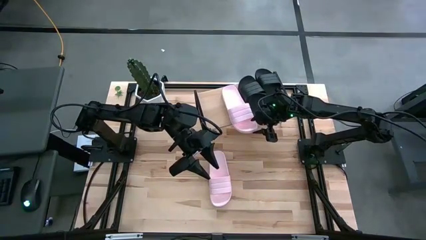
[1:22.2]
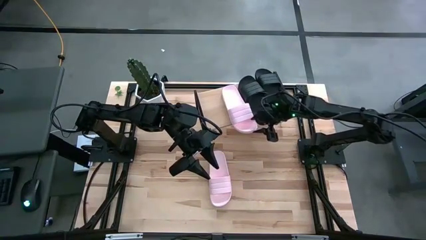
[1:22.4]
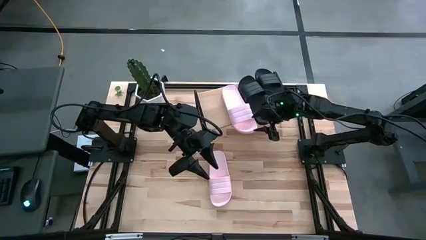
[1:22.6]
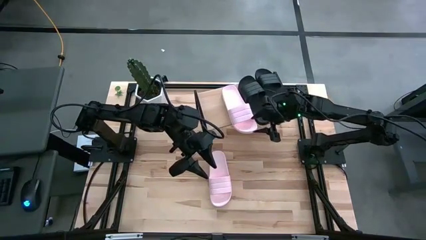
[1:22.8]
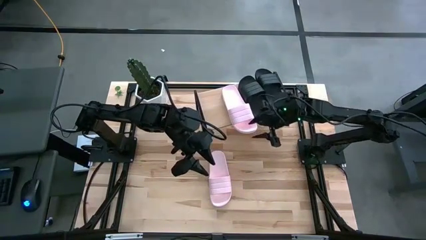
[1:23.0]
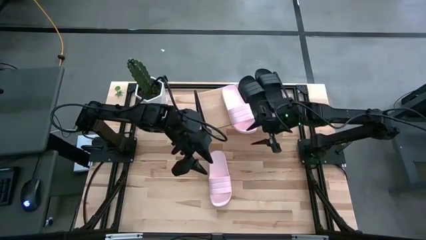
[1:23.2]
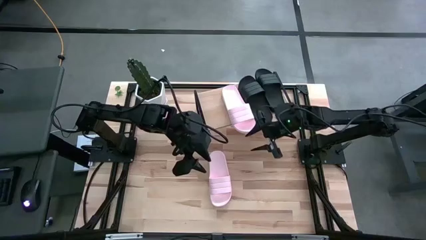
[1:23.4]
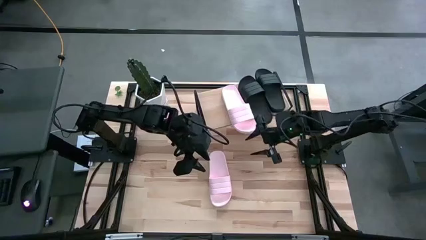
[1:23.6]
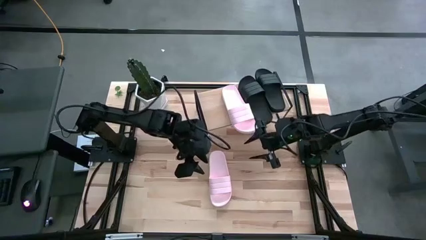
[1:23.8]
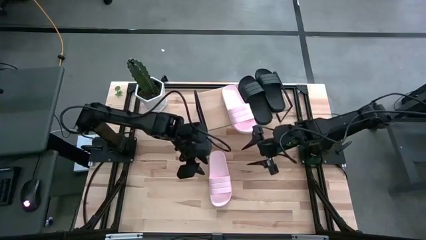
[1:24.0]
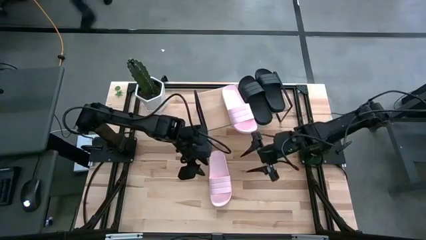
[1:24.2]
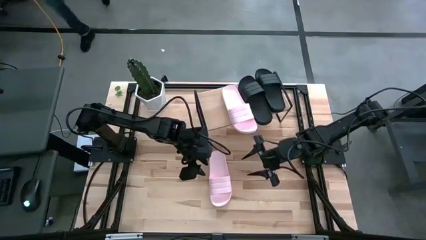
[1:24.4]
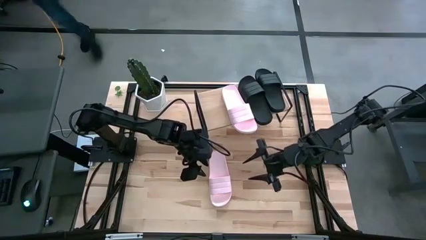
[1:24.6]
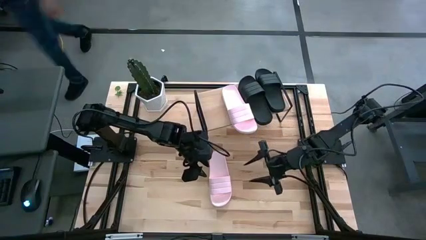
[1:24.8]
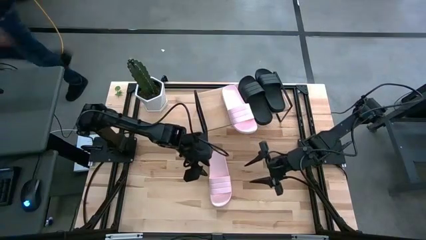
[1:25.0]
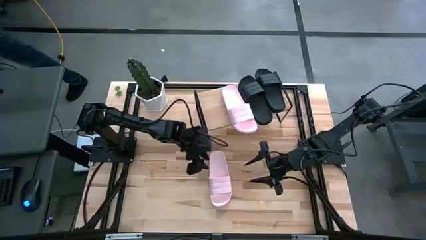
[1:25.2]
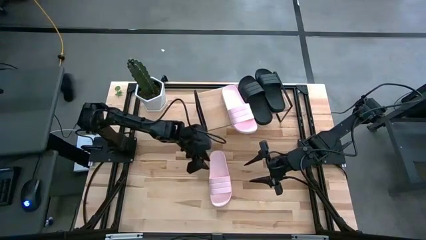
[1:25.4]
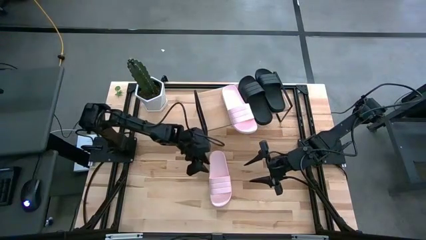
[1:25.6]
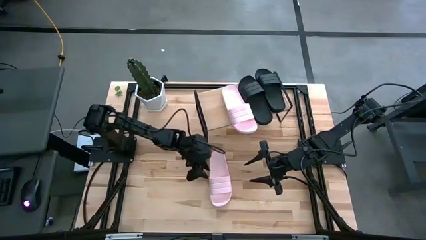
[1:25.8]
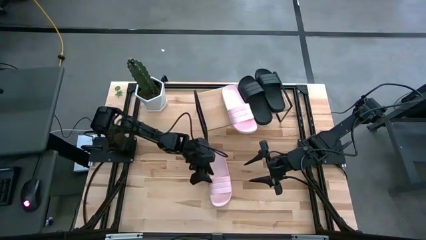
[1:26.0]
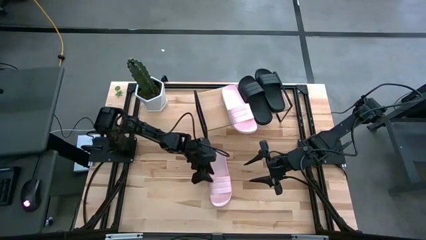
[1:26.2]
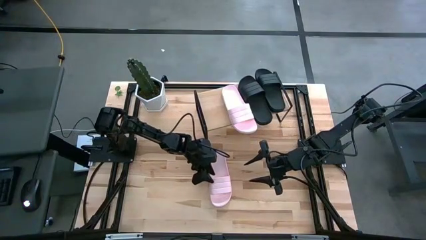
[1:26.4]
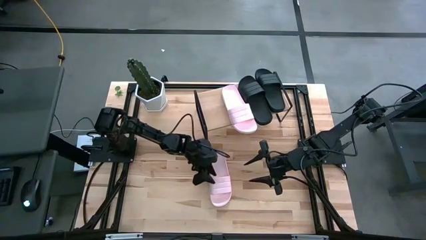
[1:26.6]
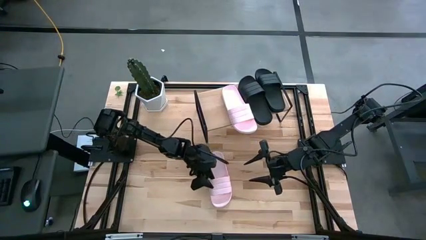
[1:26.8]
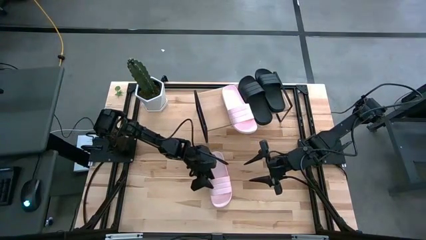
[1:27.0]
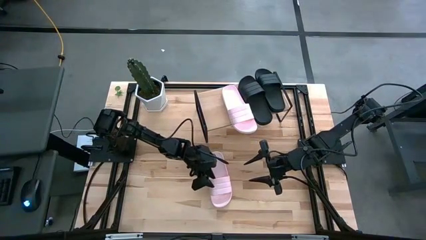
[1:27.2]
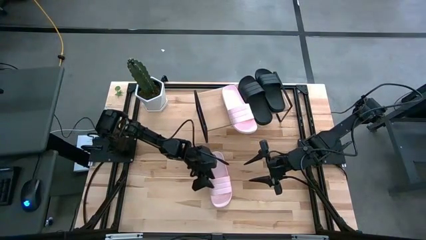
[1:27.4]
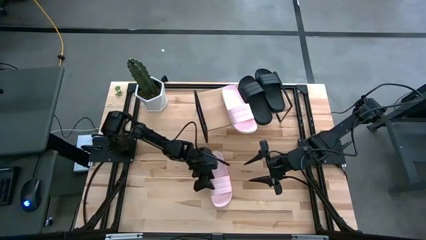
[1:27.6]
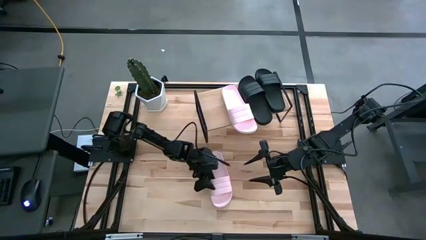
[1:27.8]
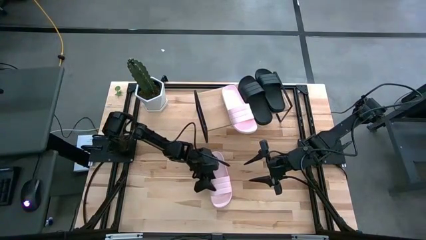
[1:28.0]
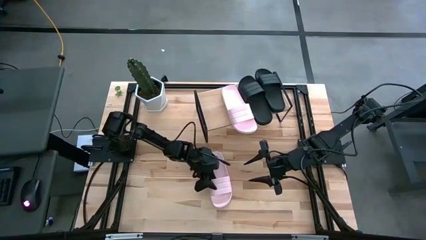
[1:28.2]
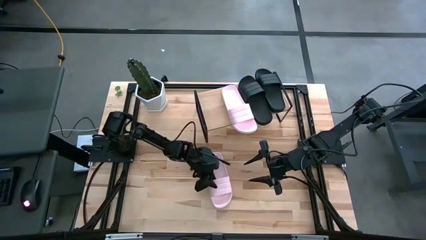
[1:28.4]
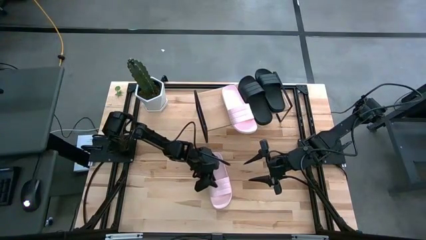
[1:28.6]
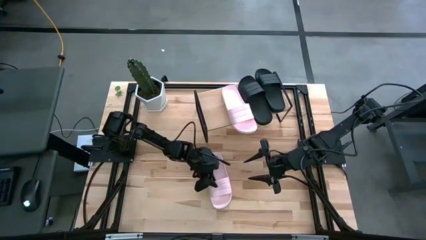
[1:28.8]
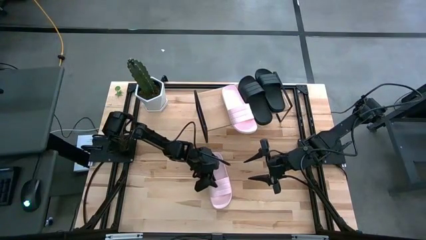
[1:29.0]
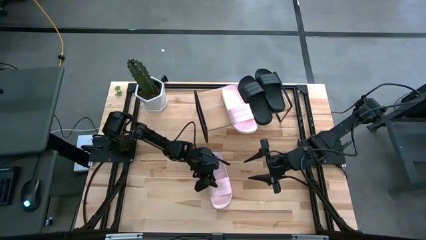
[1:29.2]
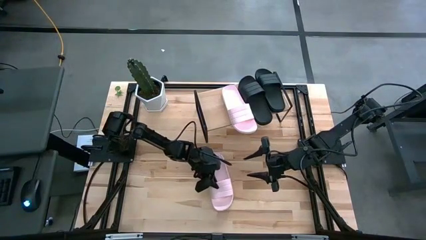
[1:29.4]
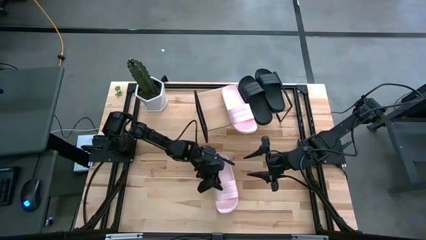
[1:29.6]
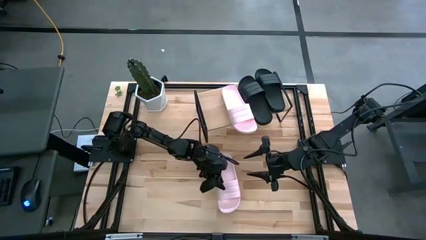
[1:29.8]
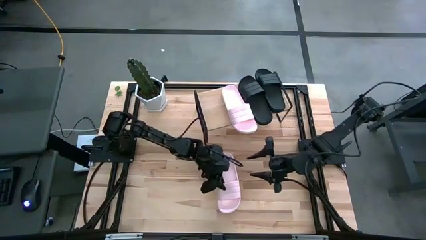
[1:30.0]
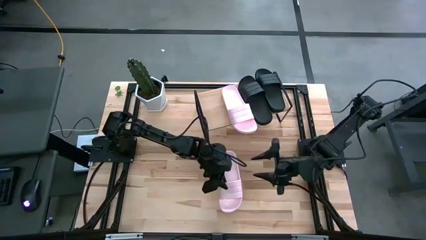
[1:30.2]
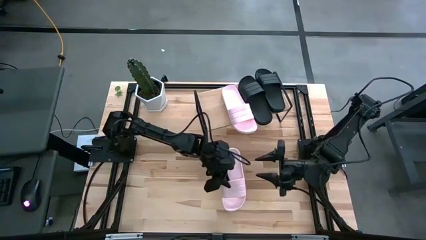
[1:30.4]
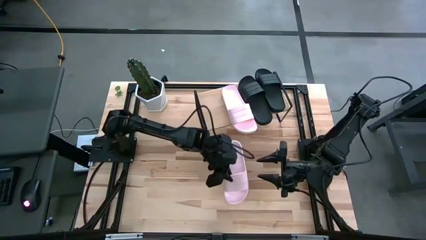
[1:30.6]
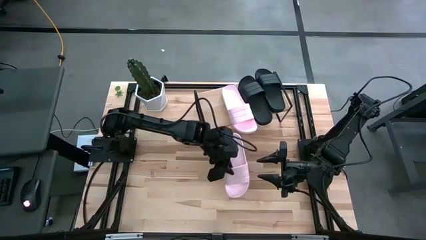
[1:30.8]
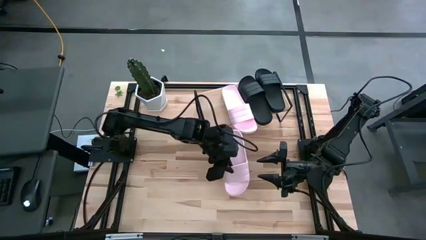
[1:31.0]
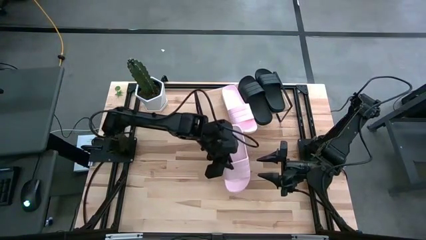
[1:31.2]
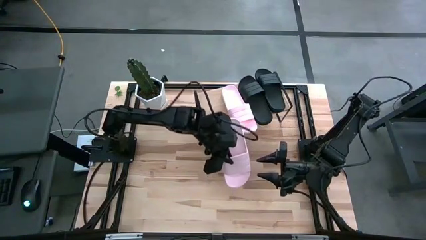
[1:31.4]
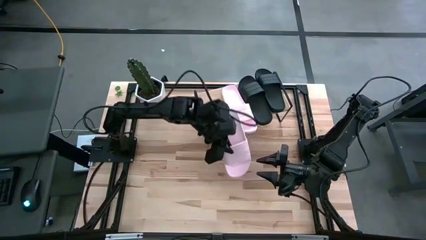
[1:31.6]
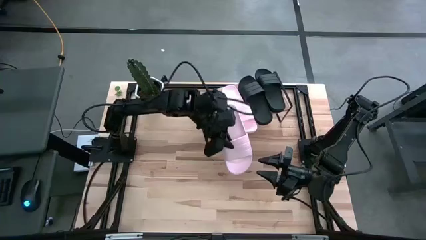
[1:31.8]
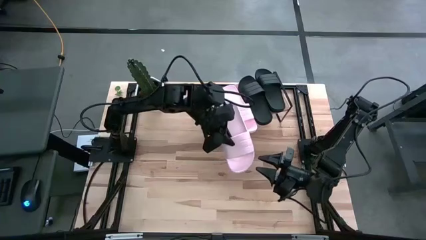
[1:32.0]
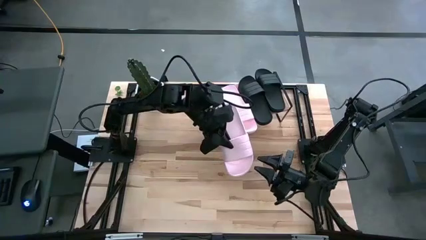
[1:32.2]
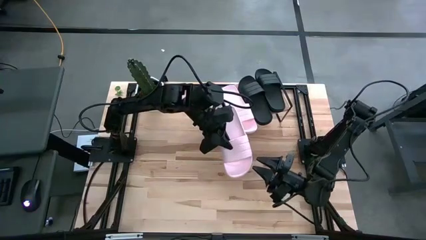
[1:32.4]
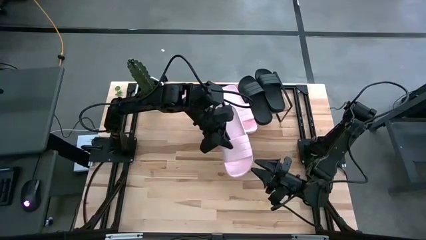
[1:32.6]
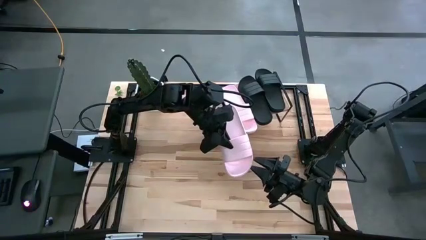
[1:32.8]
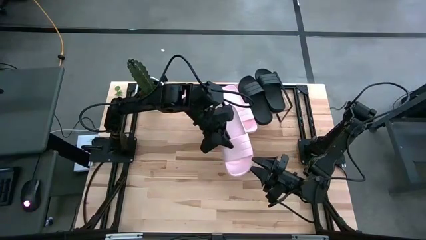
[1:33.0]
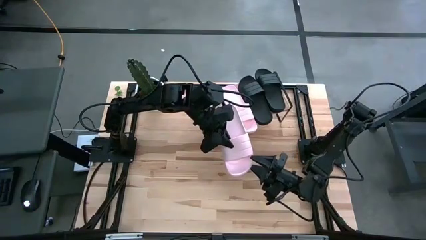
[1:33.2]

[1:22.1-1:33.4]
Task: Pick and place slides into the shelf
Put the pink slide on the shelf
